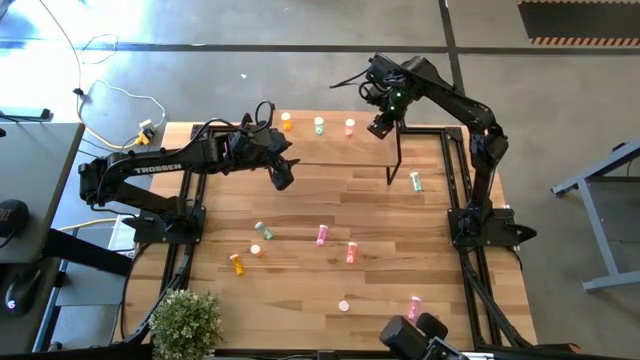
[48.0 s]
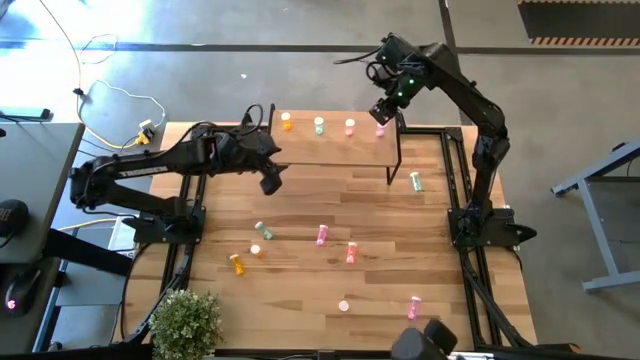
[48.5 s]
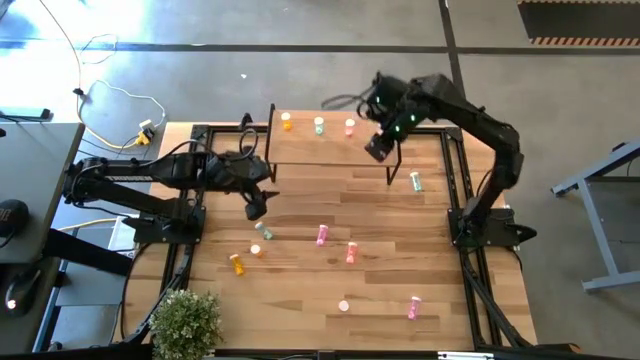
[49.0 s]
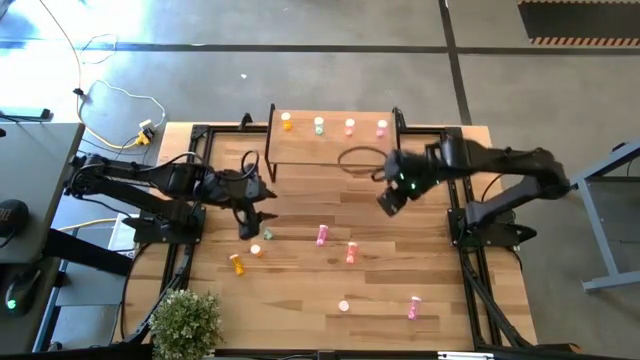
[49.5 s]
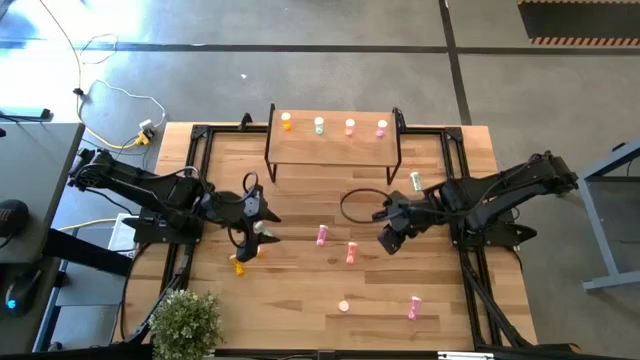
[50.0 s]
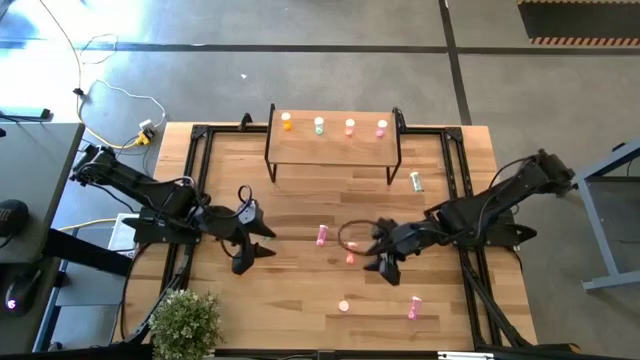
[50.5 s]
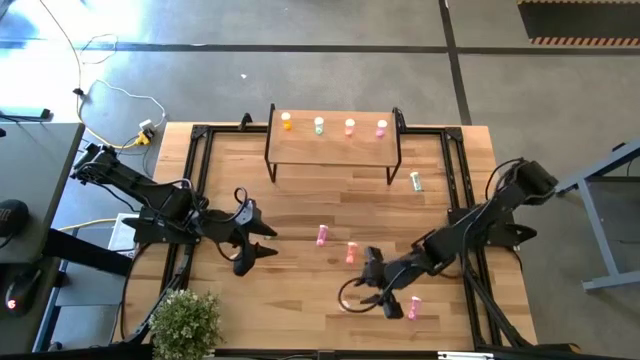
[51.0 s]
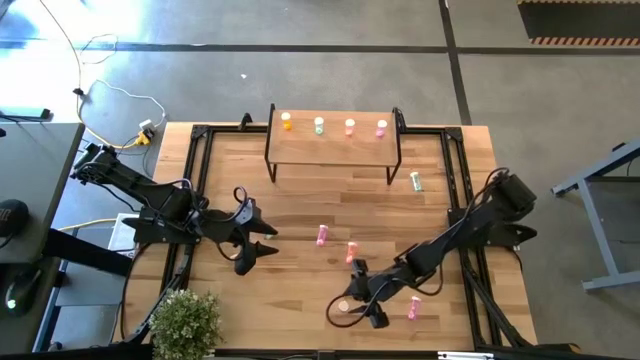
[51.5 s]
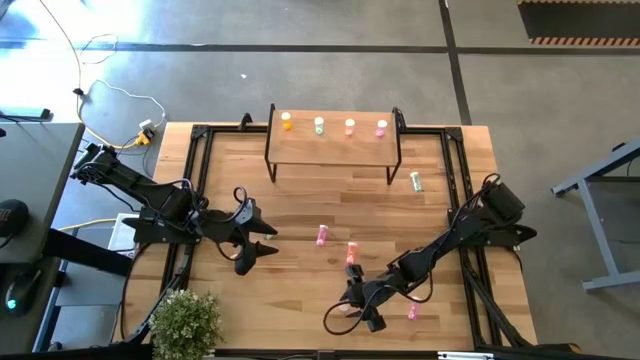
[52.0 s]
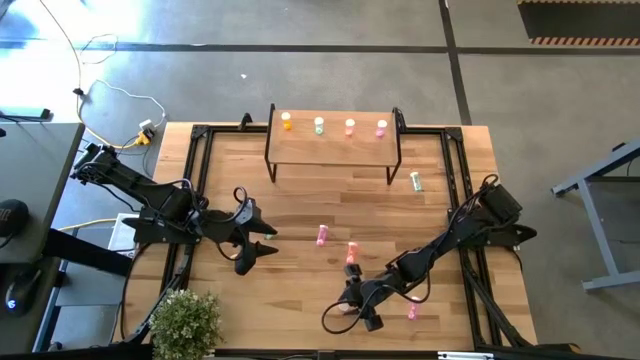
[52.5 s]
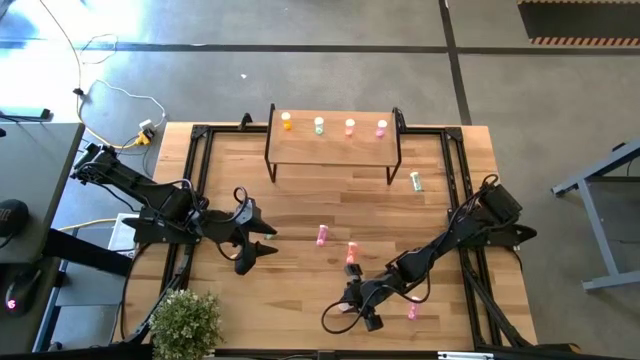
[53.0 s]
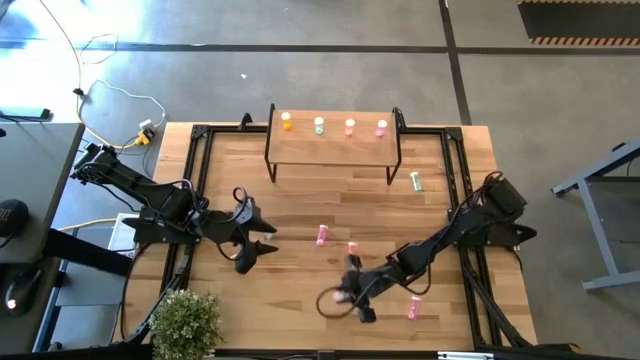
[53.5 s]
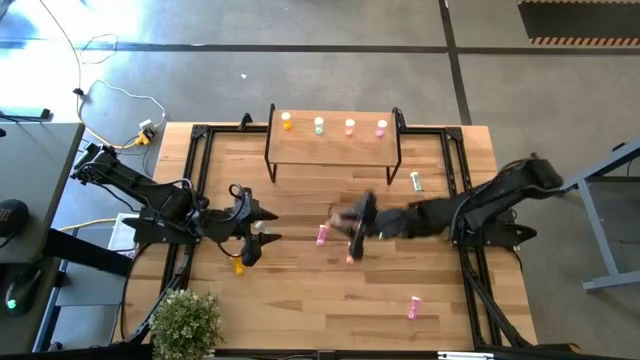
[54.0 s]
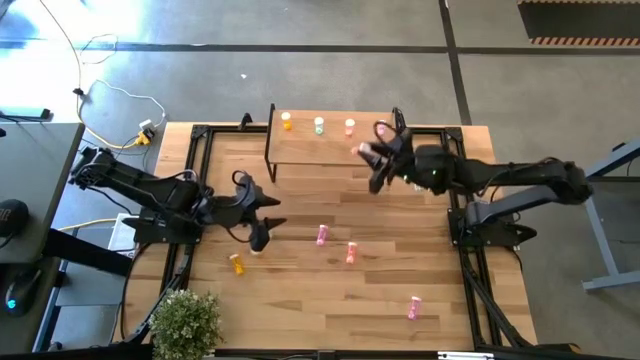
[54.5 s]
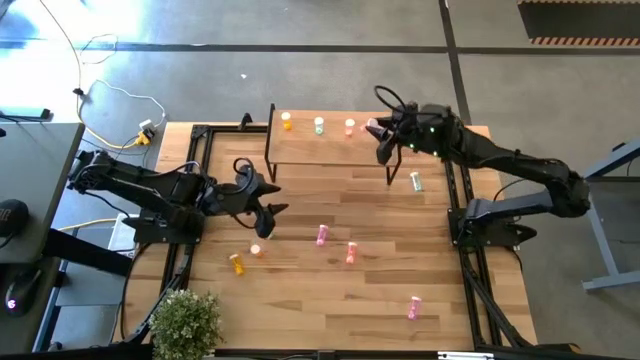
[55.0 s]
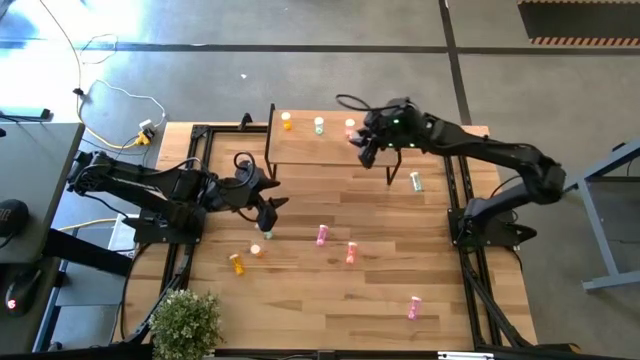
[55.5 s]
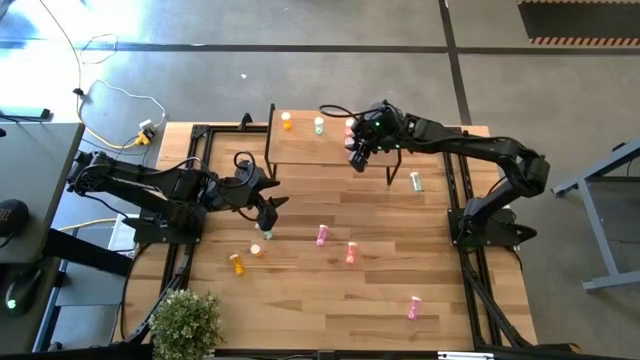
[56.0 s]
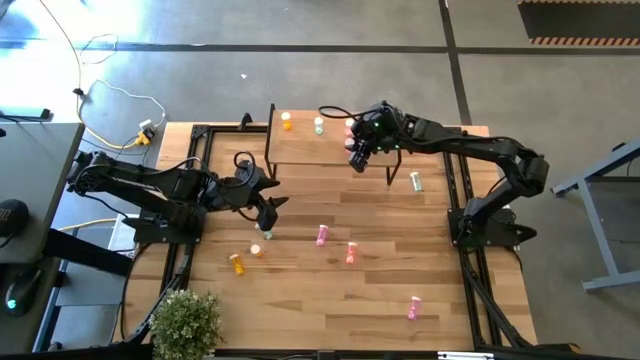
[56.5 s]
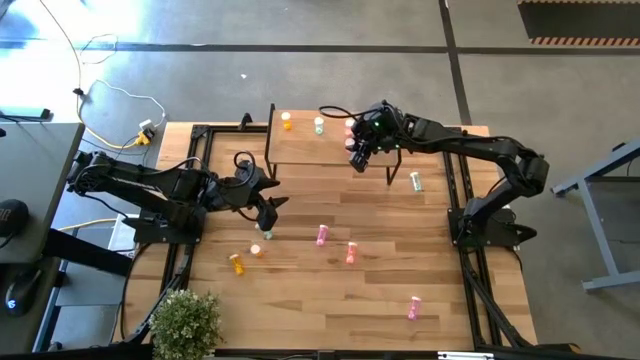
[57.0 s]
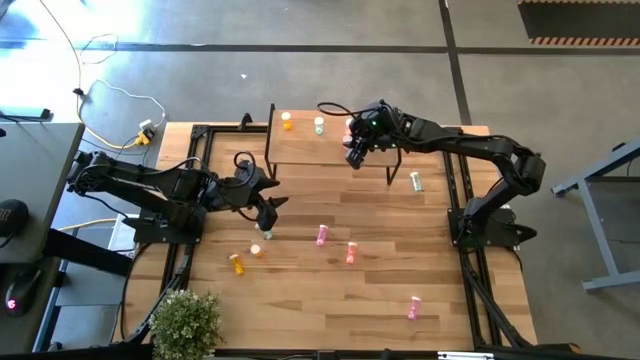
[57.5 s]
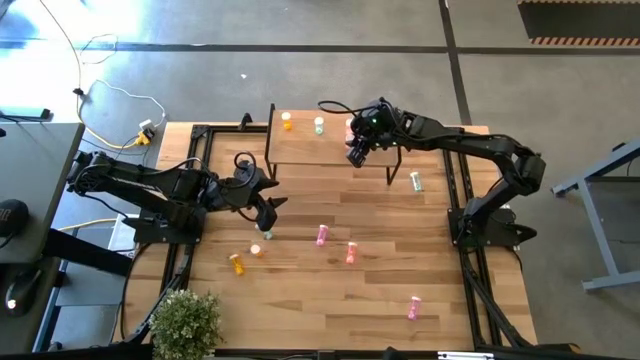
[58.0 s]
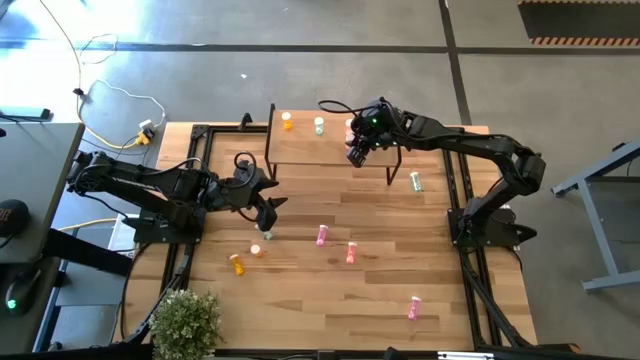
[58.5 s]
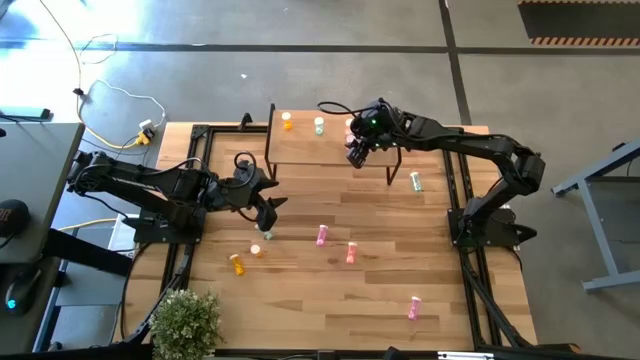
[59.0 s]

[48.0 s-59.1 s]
Task: Pick and place medicine bottles onto shelf by color
Put the bottom pink pill bottle on the shelf aligned with the pink pill bottle

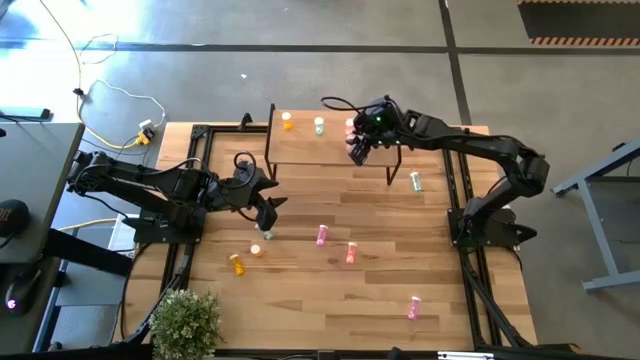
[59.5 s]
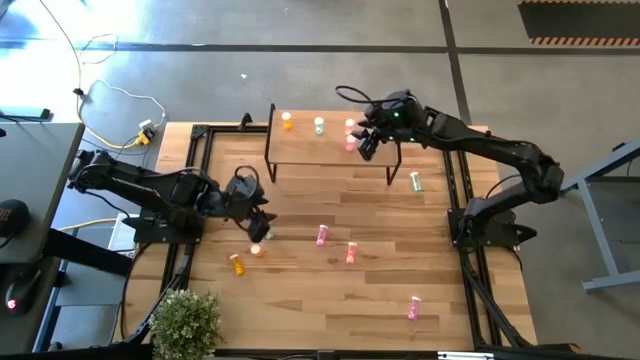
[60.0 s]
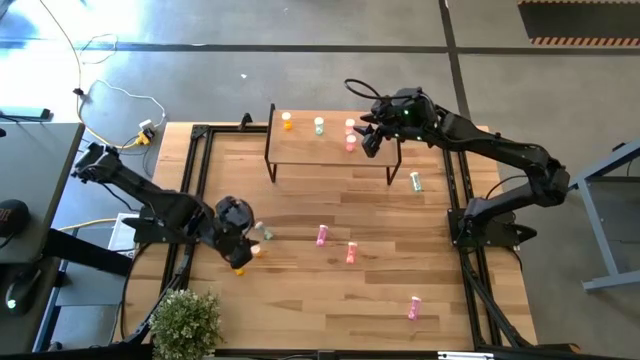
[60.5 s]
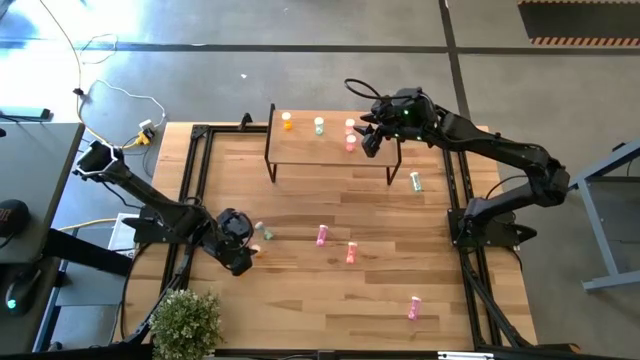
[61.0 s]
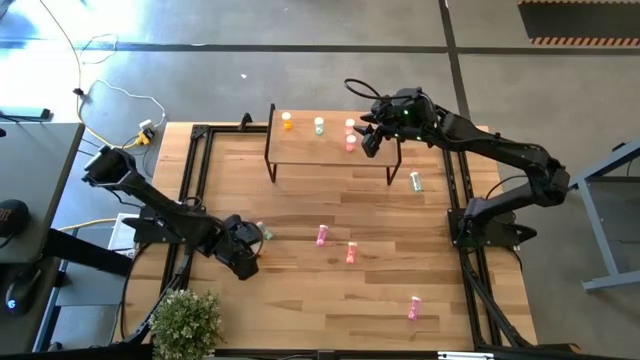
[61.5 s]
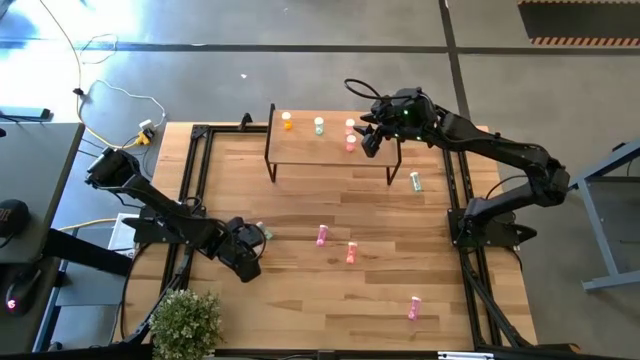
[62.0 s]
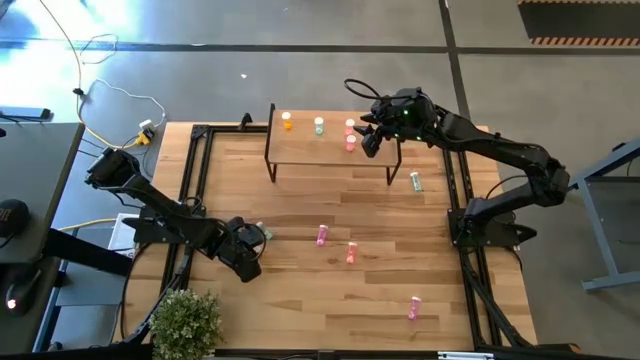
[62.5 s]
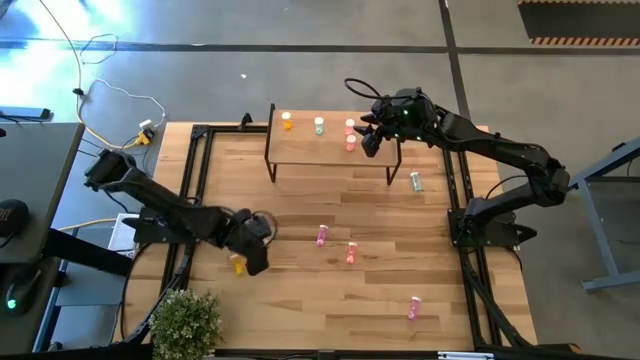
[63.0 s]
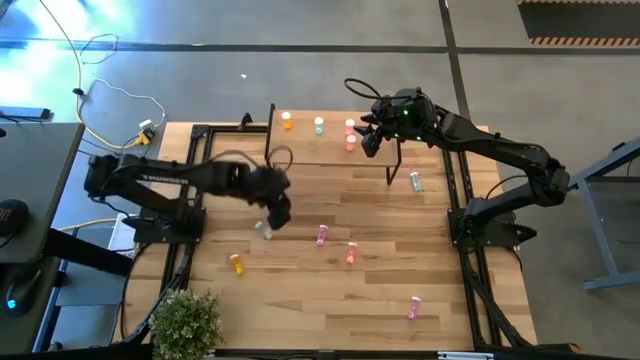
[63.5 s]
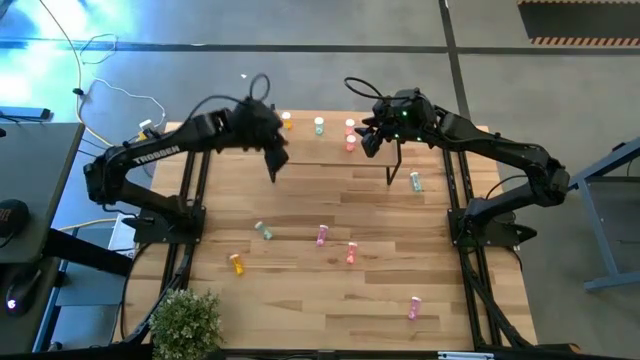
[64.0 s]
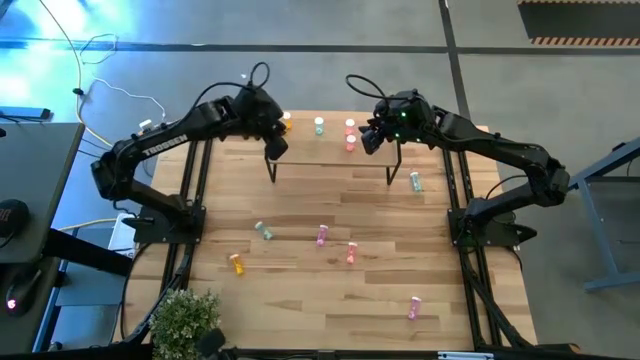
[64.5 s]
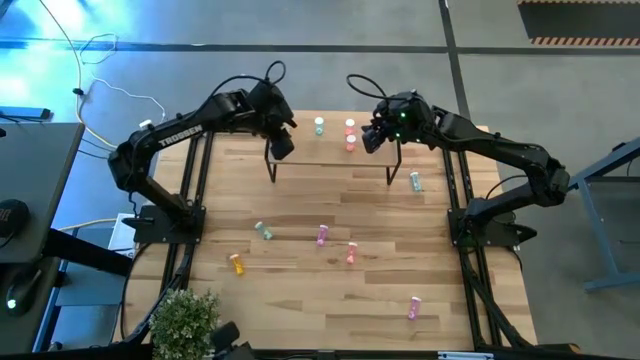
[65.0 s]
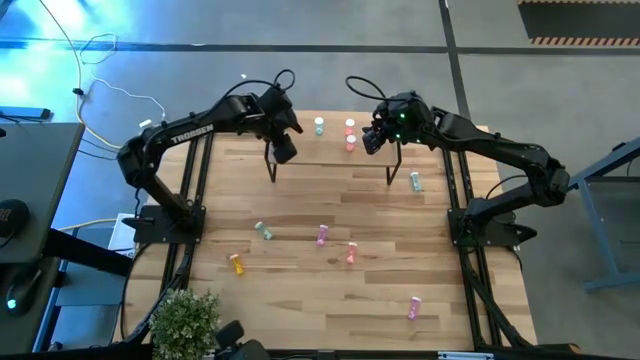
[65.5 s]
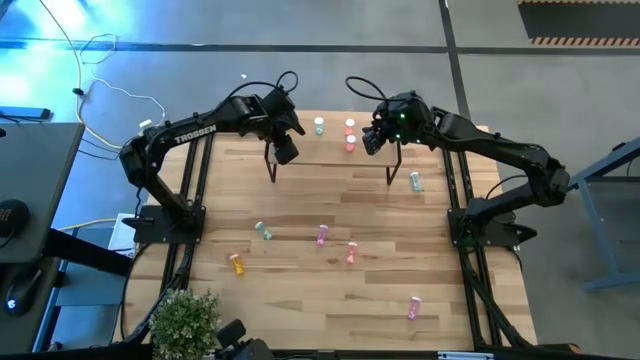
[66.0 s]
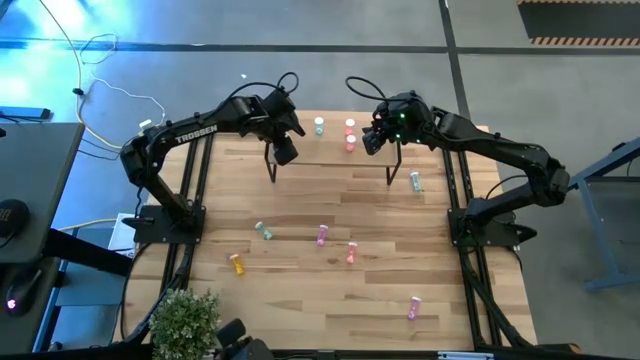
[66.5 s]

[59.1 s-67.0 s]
Put the right orange pill bottle on the shelf aligned with the orange pill bottle

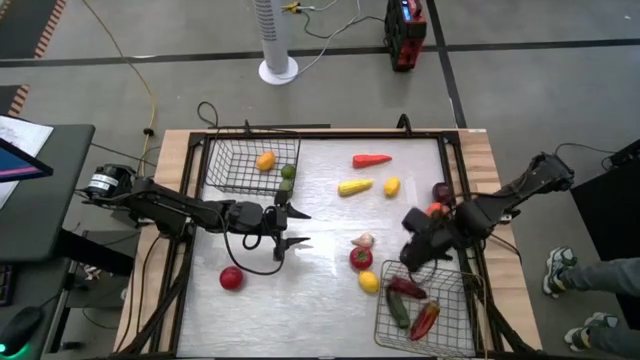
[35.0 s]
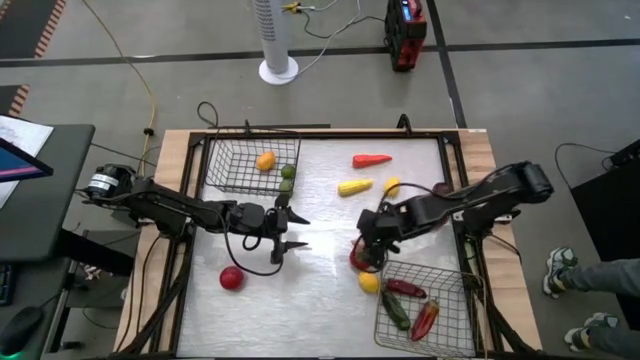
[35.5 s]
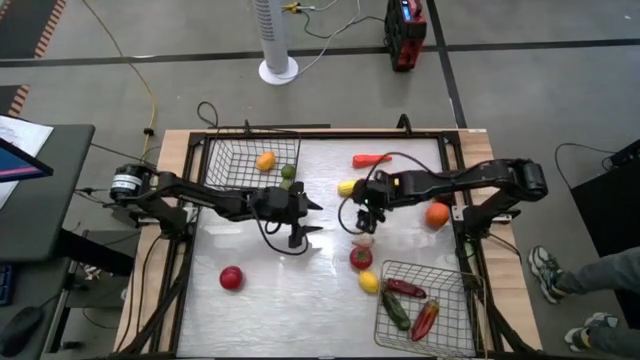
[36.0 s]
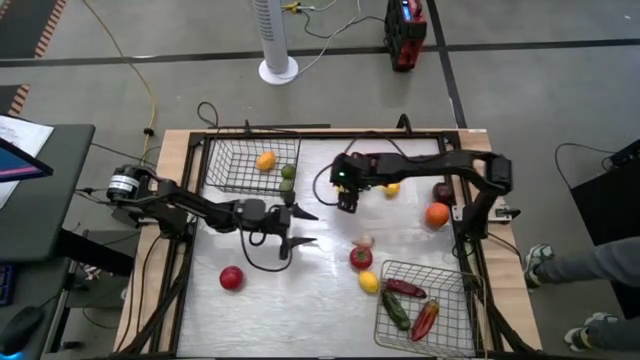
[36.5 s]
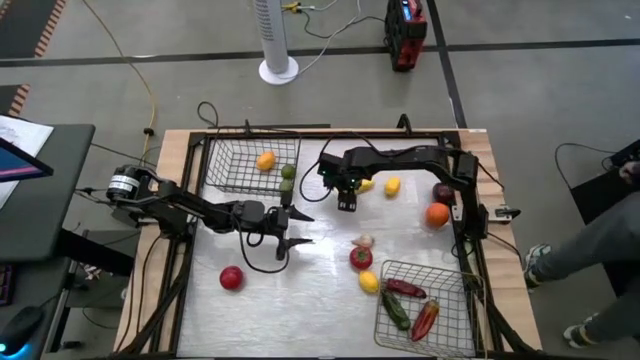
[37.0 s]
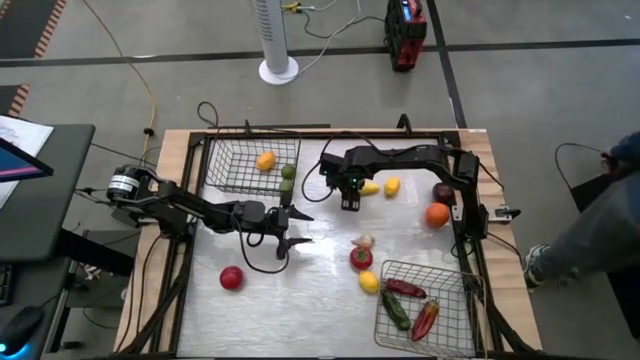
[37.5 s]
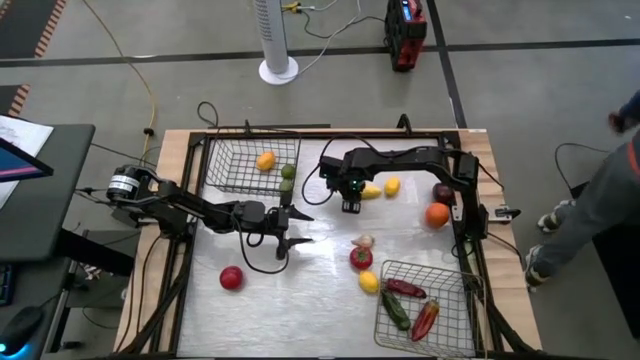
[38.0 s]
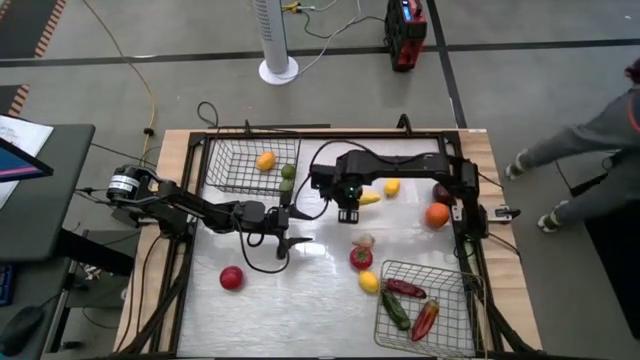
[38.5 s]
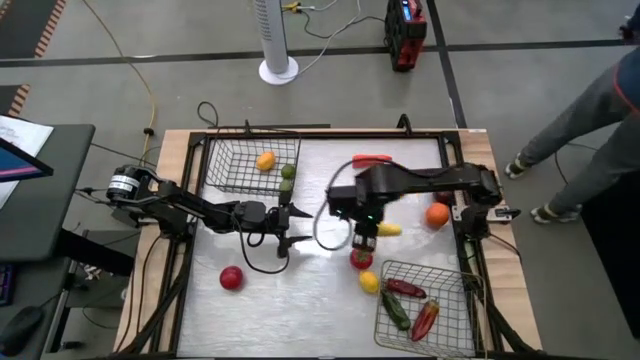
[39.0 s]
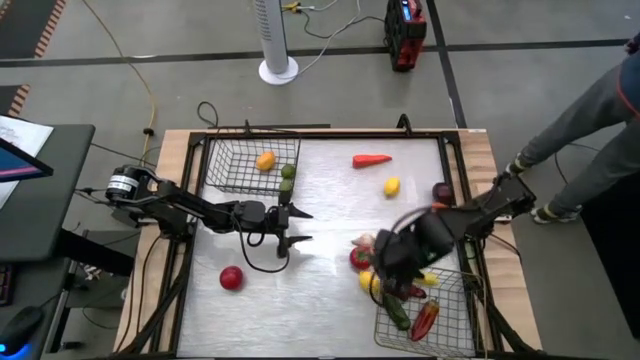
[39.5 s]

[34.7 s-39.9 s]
Task: Sort produce into baskets
Put the corn into the golden wire basket
